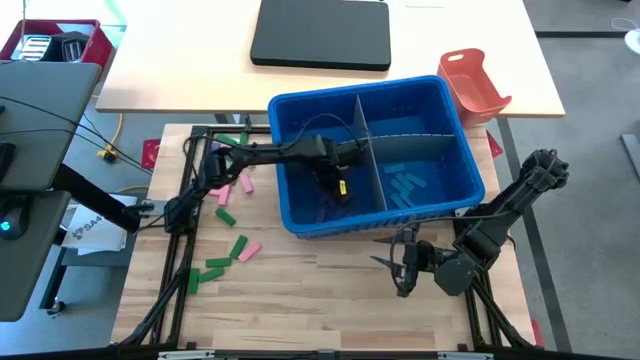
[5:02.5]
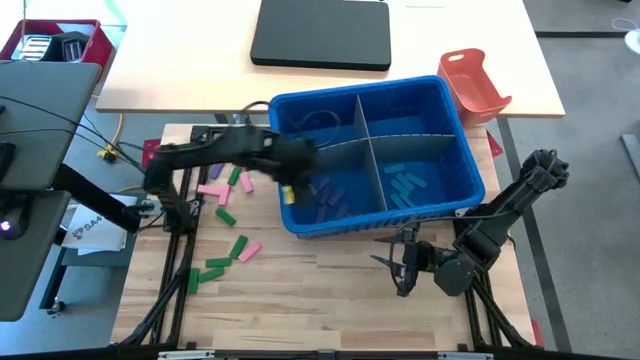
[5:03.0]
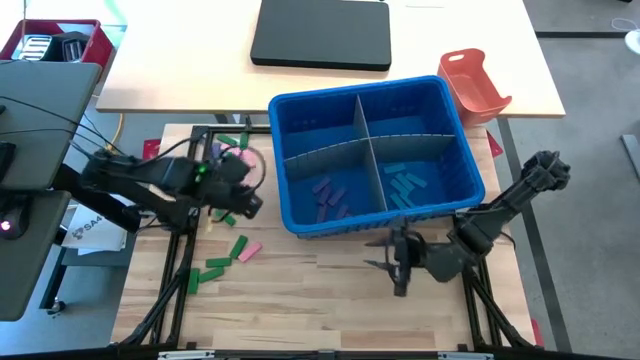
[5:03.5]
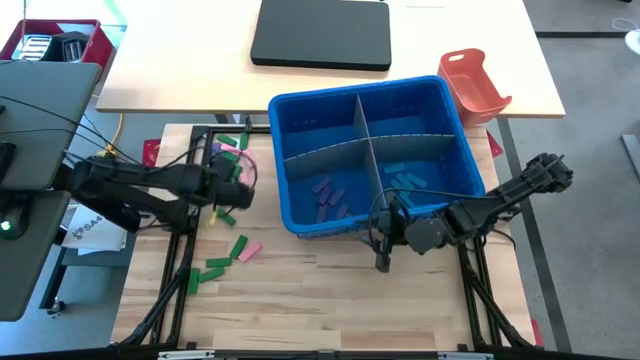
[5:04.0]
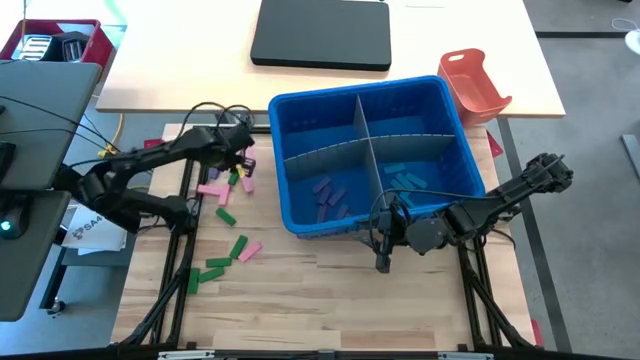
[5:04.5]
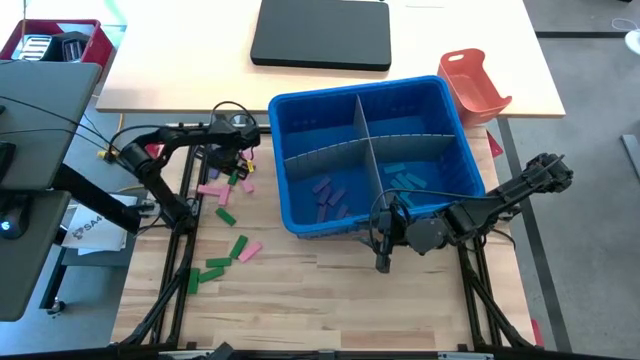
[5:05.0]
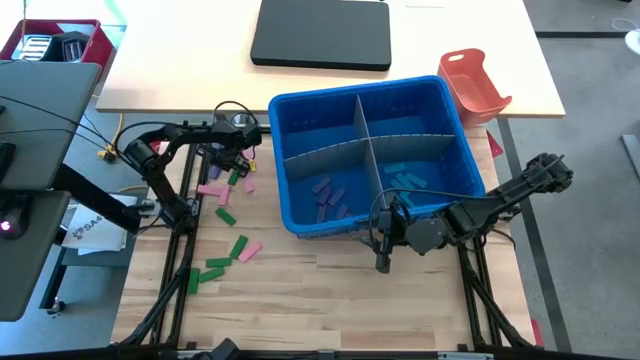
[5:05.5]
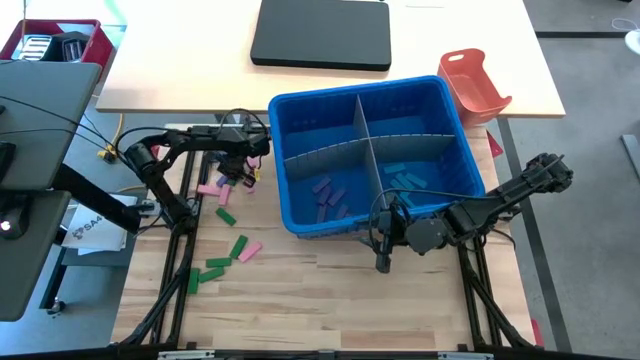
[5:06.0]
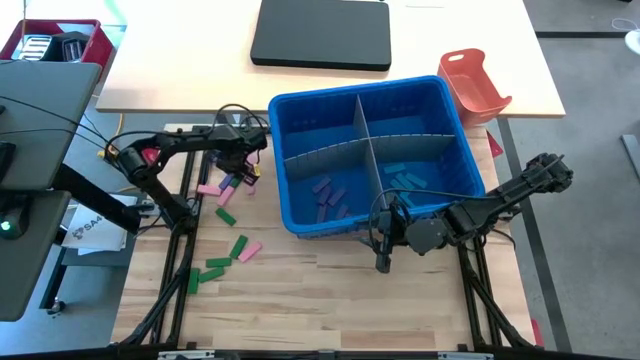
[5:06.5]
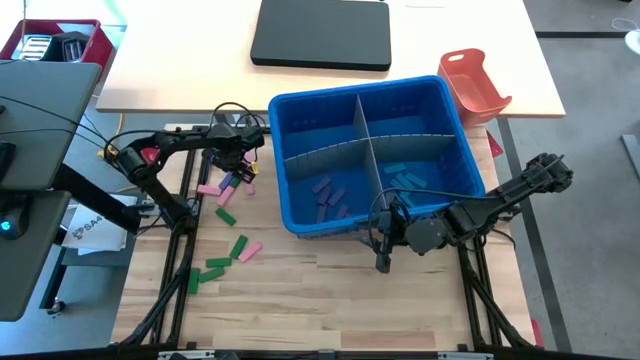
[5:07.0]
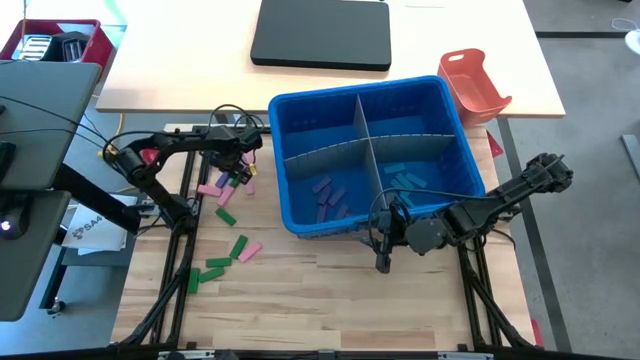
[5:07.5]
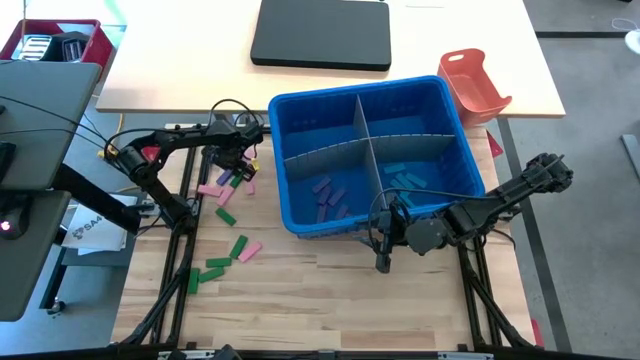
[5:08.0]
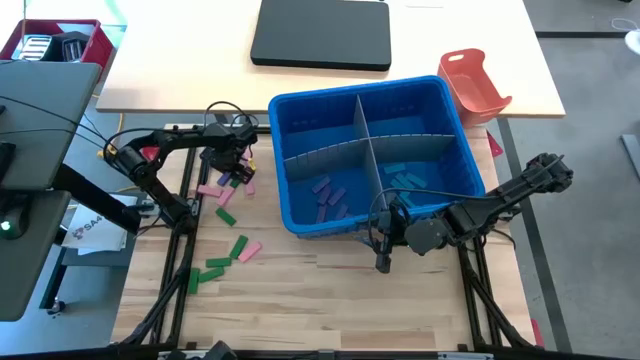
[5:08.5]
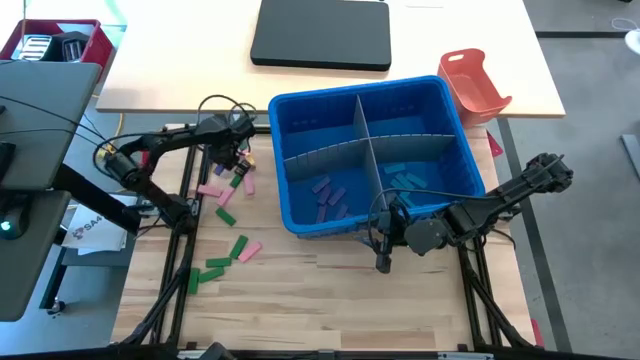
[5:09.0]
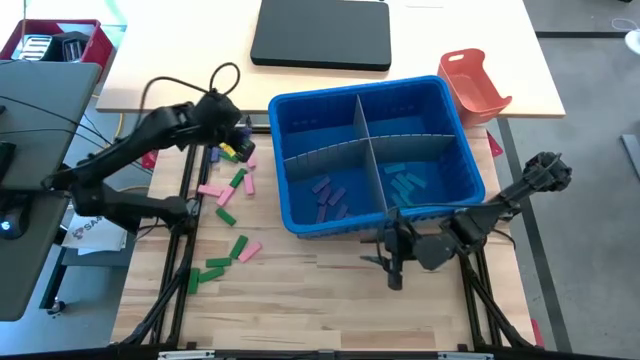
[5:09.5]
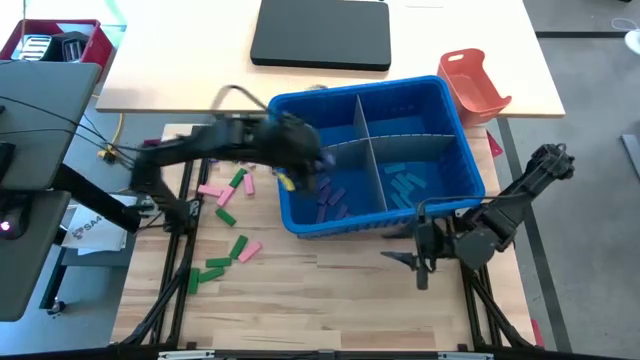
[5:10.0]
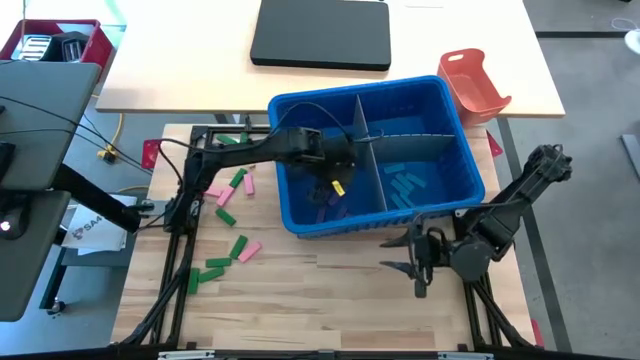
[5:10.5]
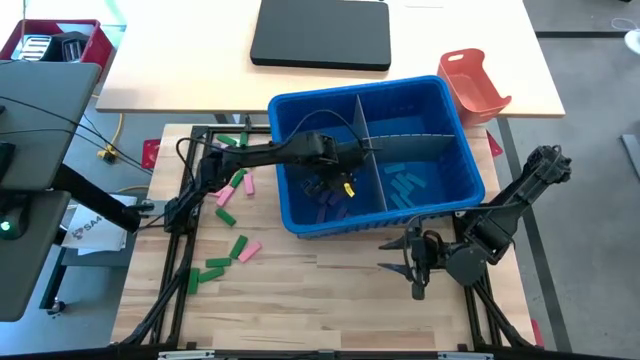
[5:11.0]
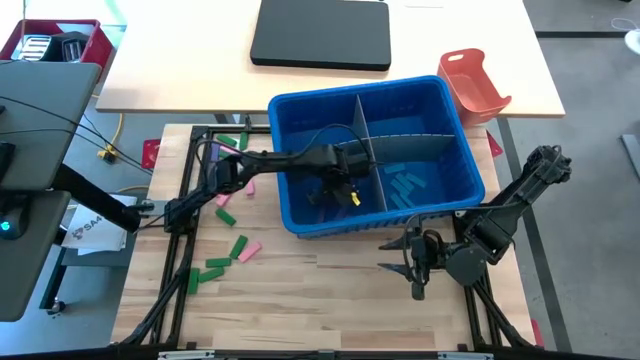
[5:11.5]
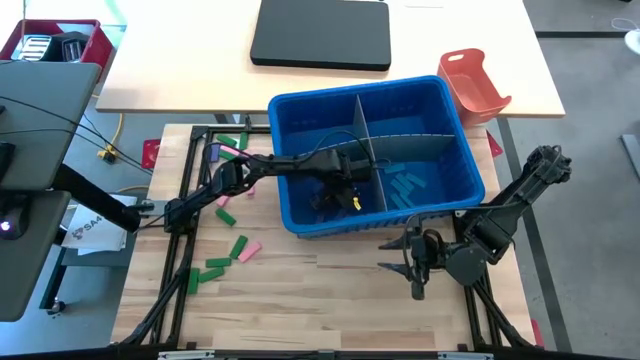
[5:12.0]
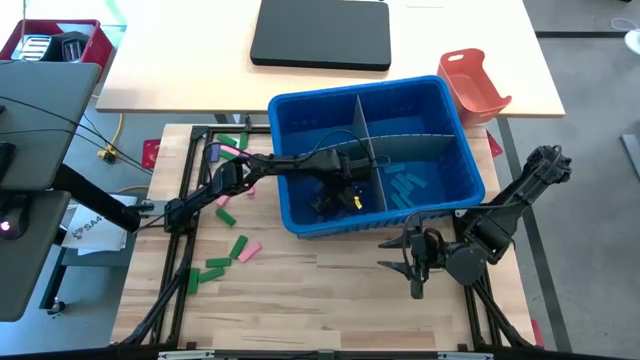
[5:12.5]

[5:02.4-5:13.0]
Task: Sort blocks
Put the purple block into the blue bin with the other purple block

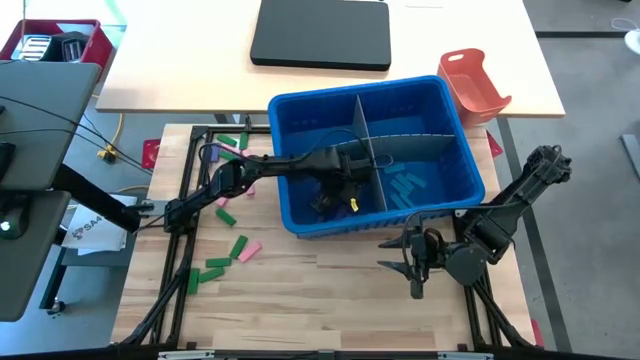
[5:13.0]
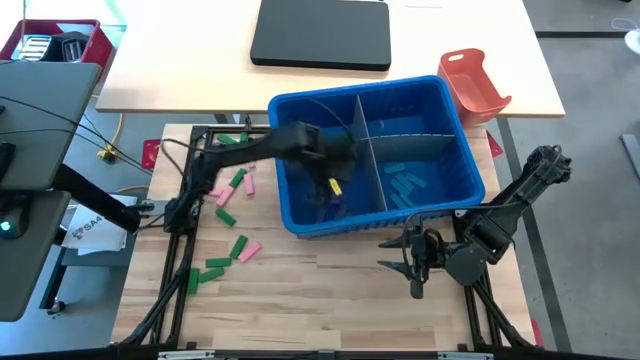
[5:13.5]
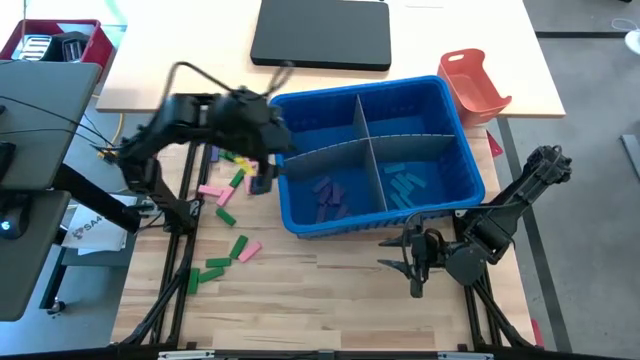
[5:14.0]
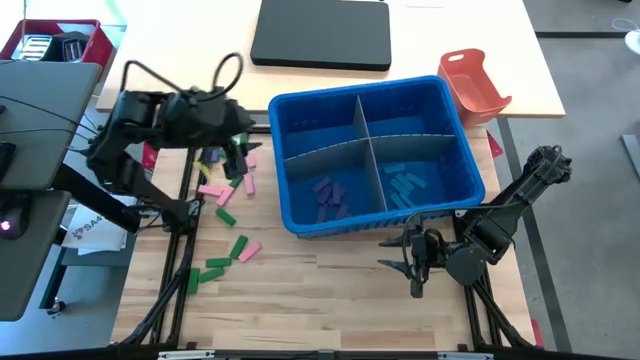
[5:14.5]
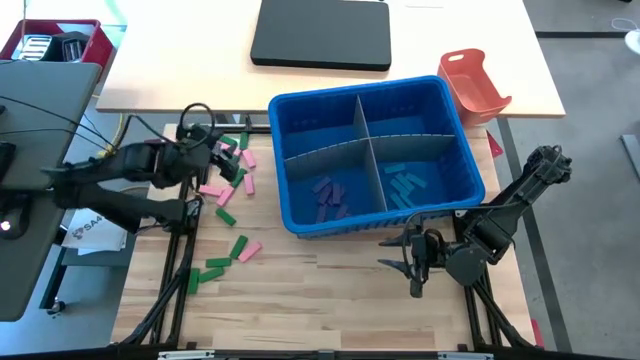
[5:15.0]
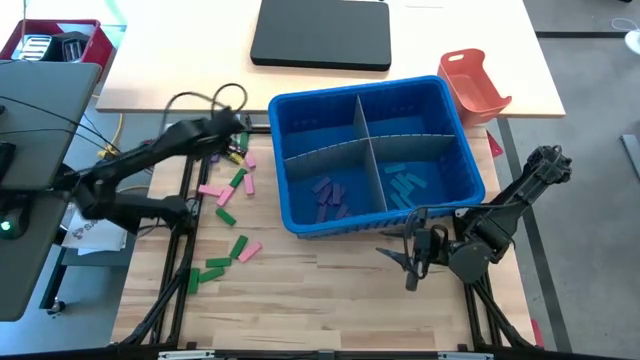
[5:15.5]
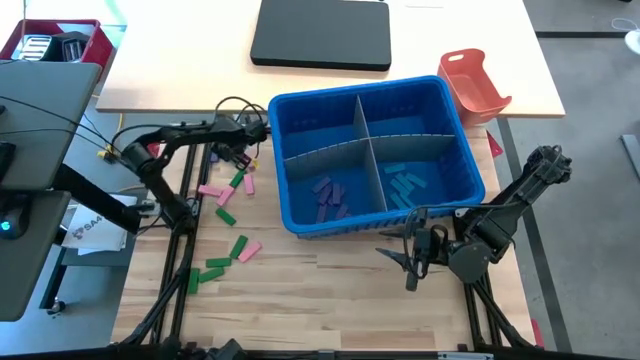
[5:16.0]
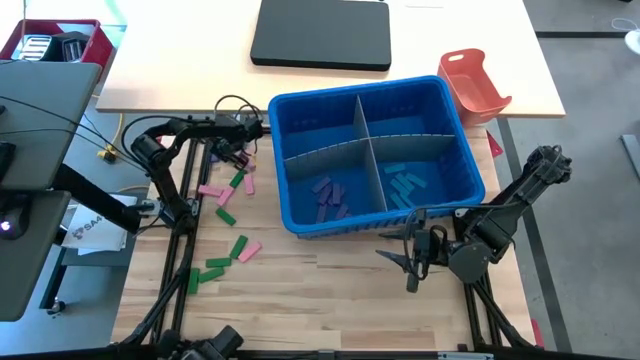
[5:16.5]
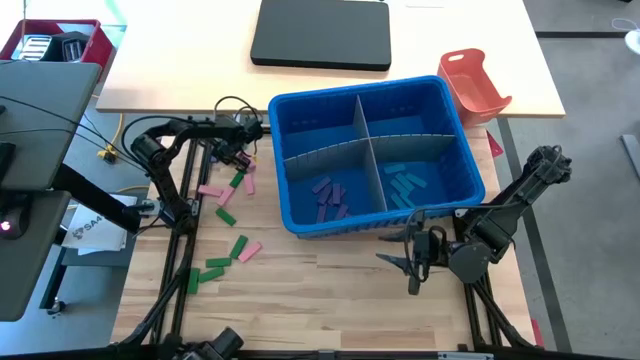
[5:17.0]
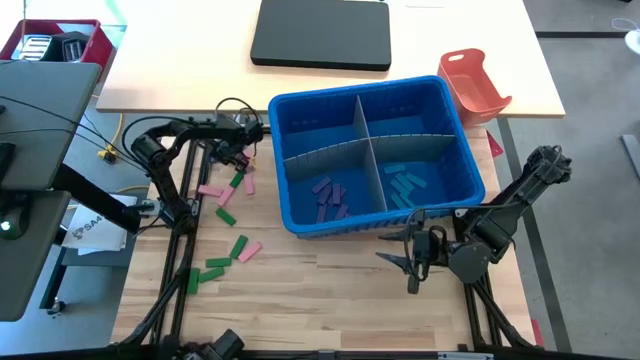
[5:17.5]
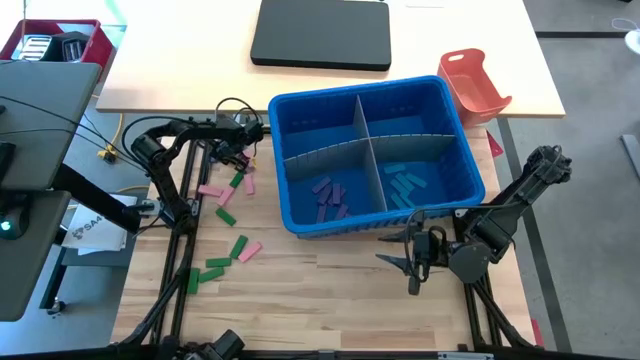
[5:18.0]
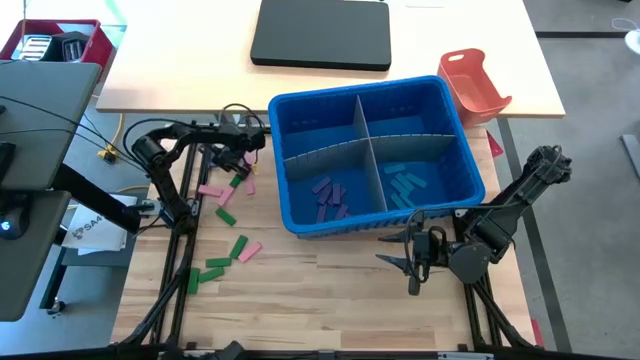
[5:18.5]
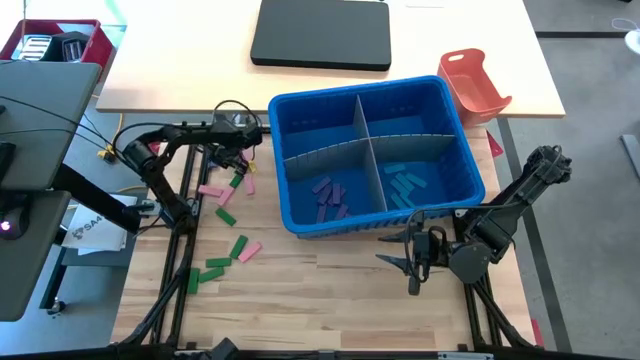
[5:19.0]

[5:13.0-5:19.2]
Put the purple block into the blue bin with the other purple block

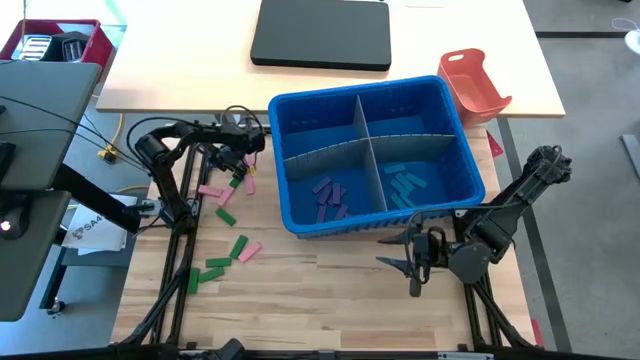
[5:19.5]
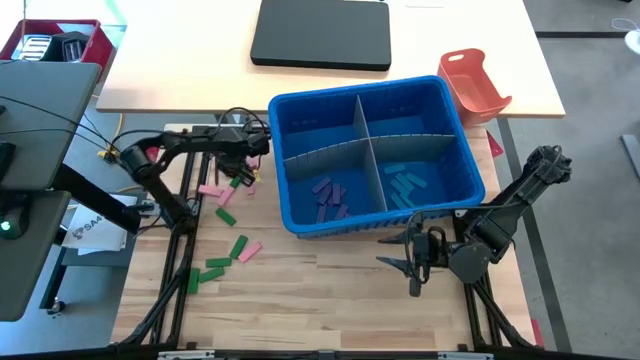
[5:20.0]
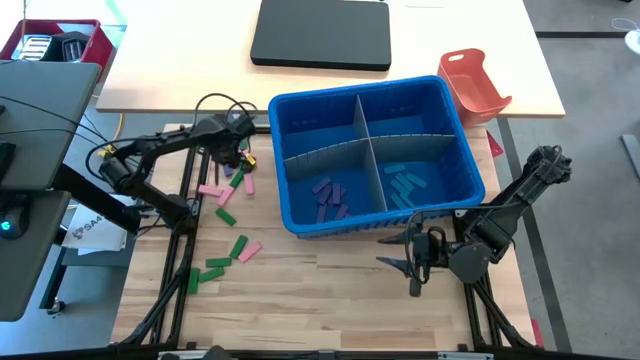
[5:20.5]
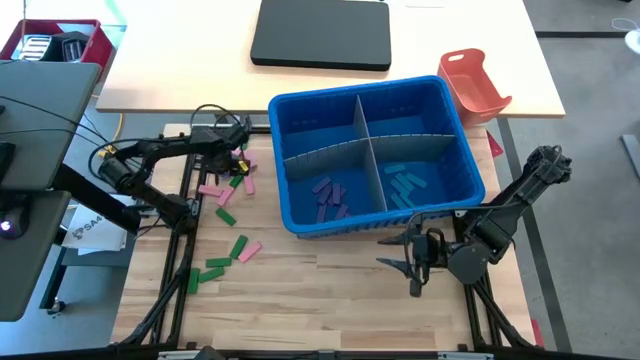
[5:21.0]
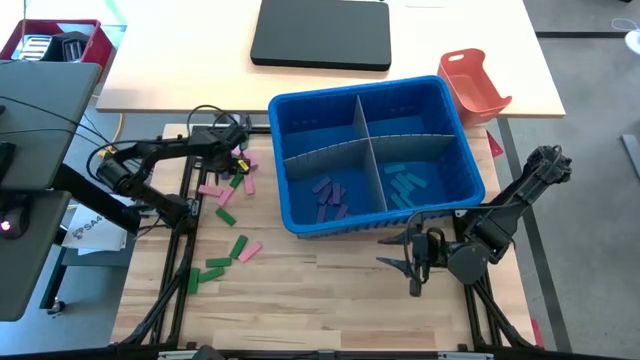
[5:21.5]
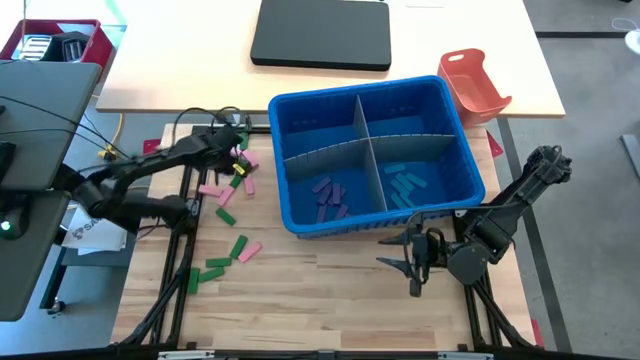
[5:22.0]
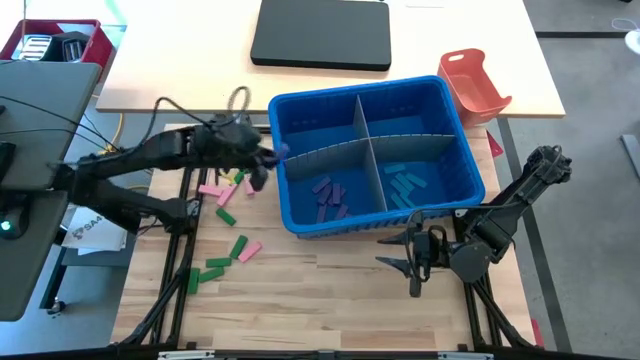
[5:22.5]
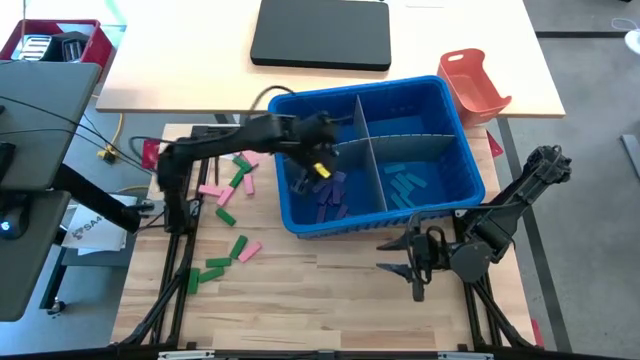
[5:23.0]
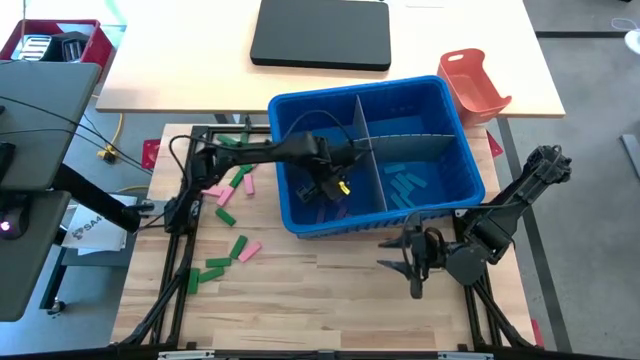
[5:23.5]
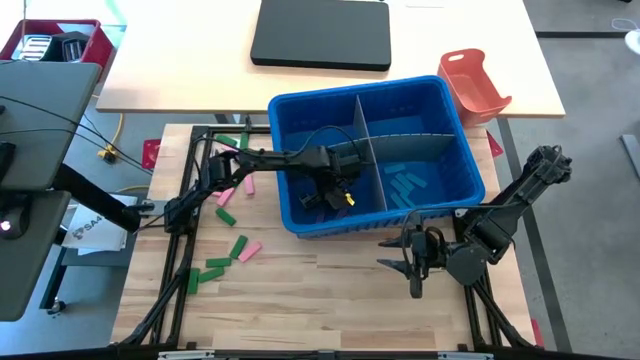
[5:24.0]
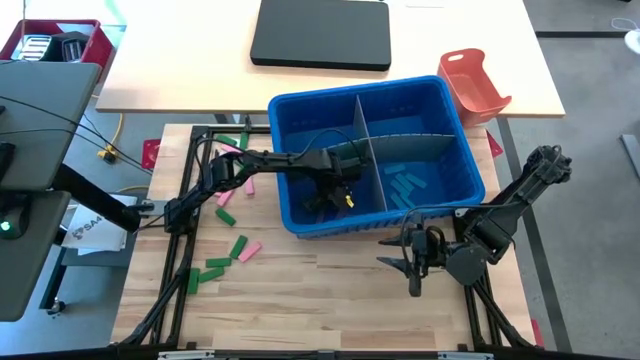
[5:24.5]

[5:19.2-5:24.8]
Put the purple block into the blue bin with the other purple block
